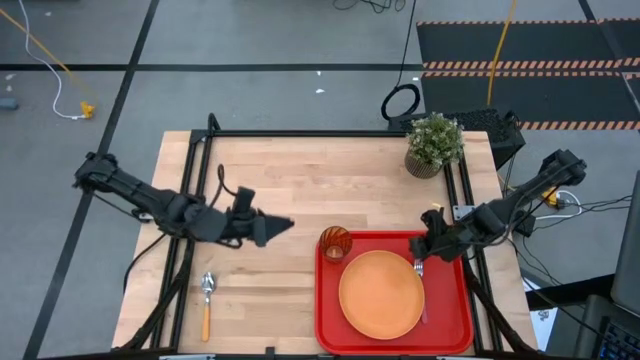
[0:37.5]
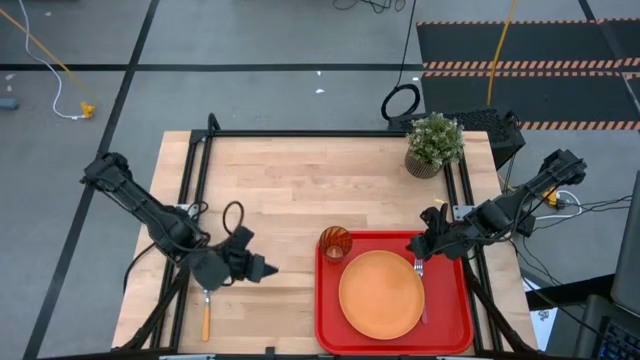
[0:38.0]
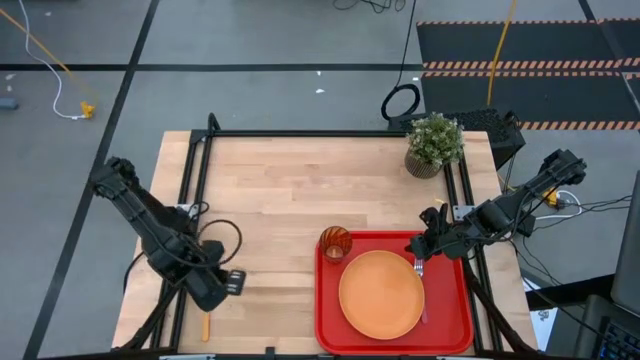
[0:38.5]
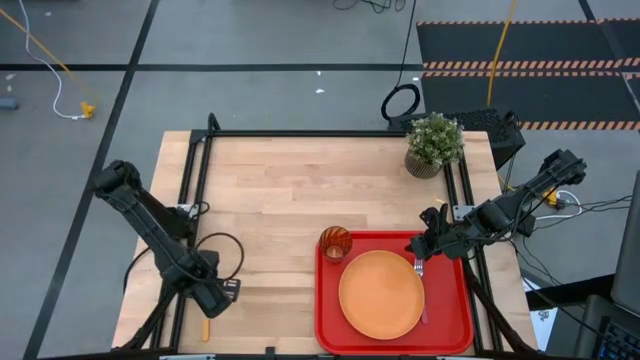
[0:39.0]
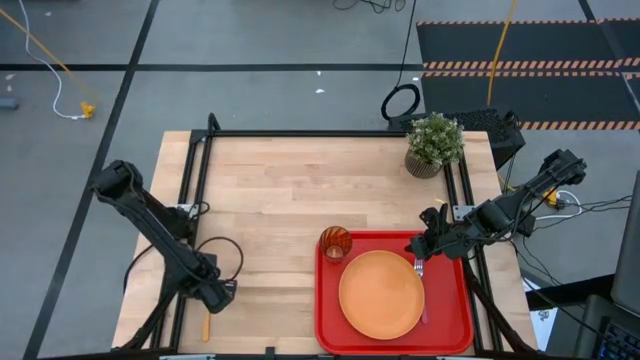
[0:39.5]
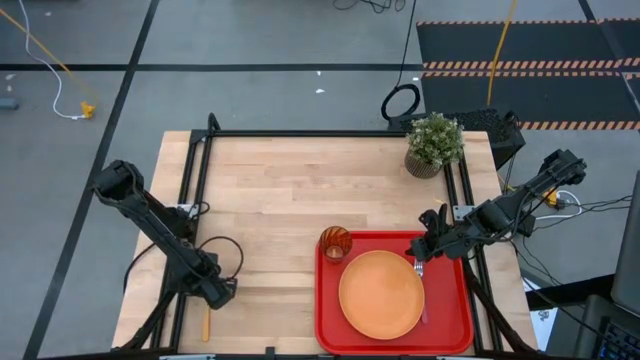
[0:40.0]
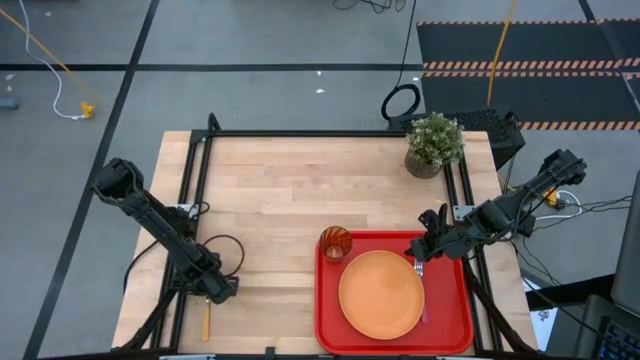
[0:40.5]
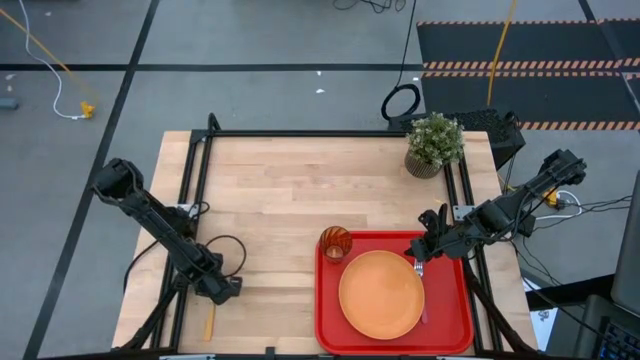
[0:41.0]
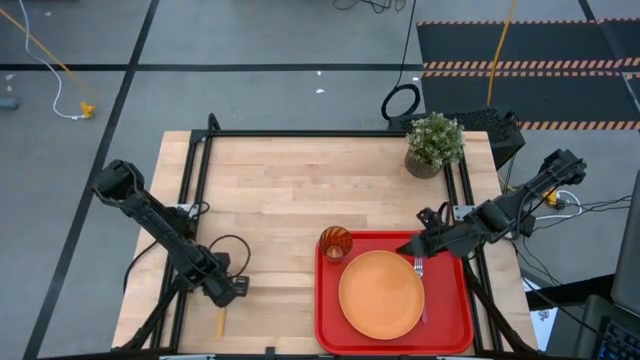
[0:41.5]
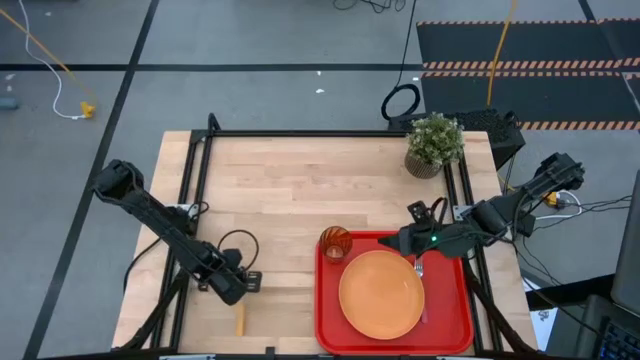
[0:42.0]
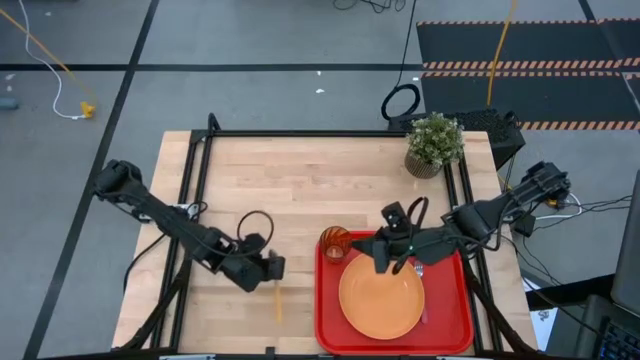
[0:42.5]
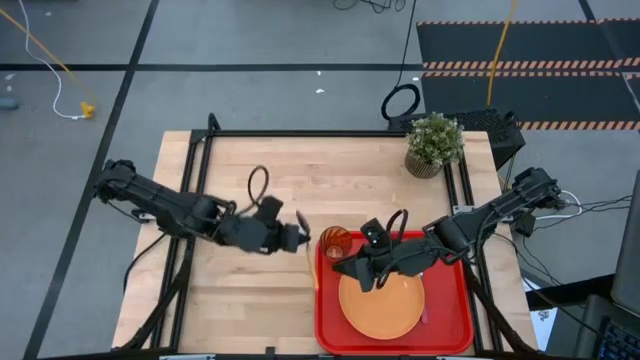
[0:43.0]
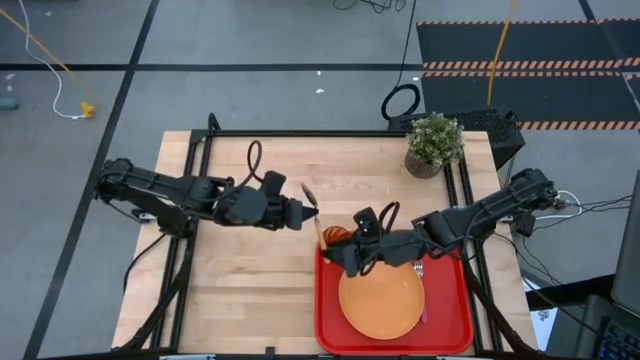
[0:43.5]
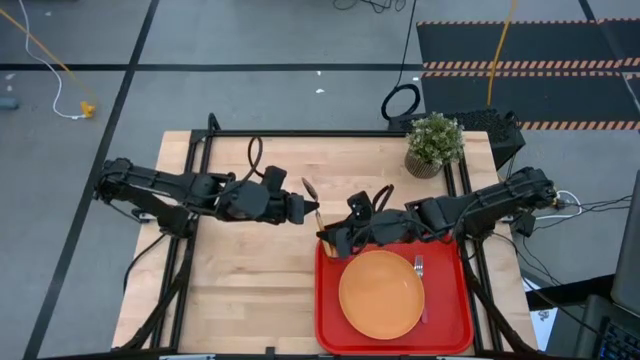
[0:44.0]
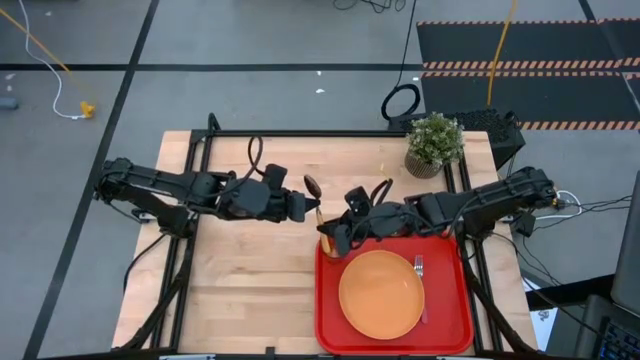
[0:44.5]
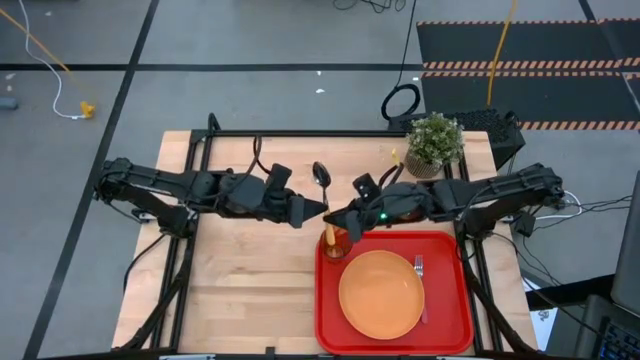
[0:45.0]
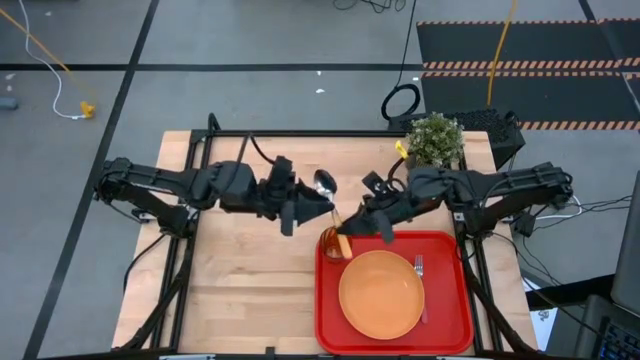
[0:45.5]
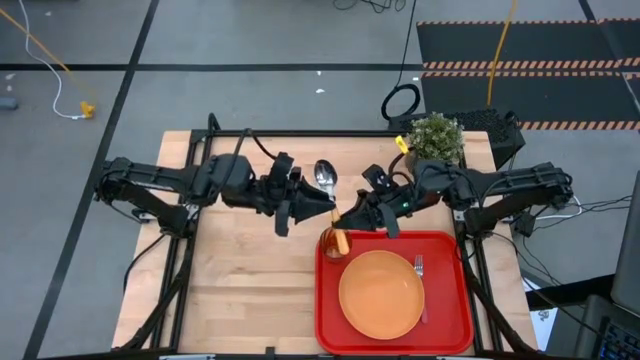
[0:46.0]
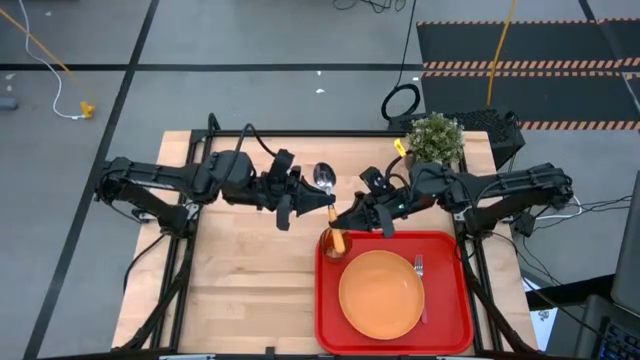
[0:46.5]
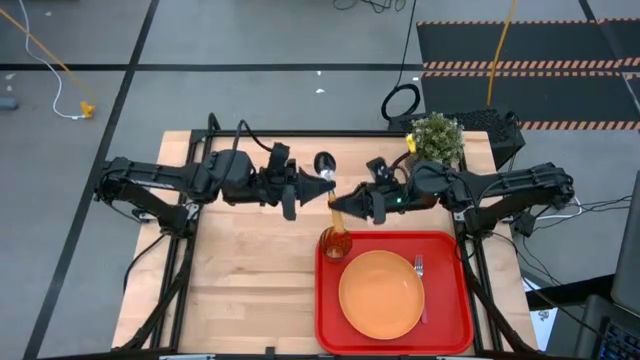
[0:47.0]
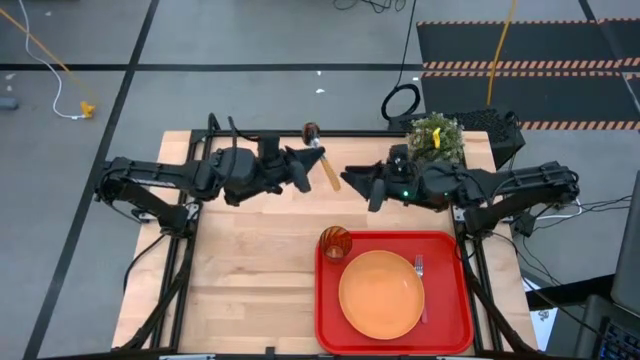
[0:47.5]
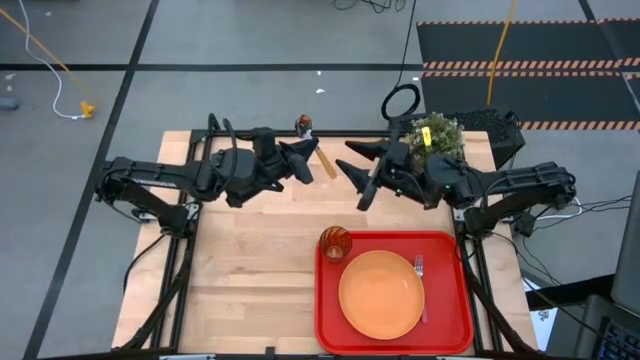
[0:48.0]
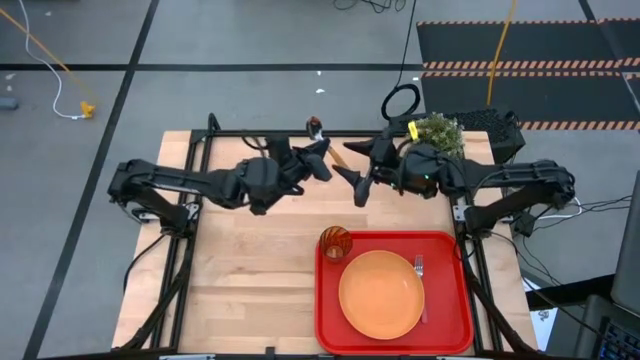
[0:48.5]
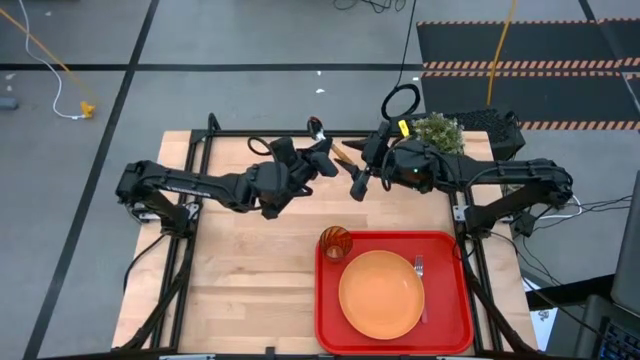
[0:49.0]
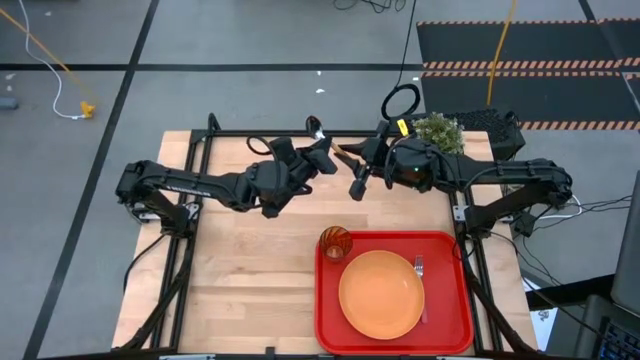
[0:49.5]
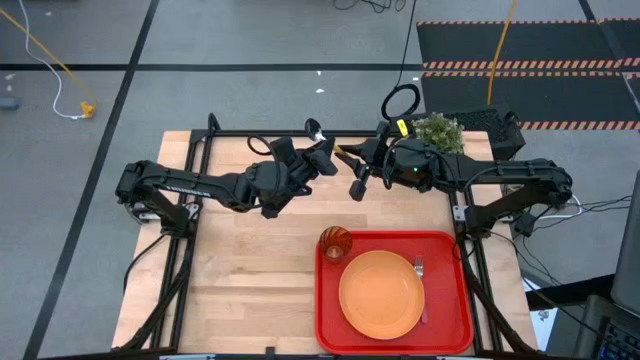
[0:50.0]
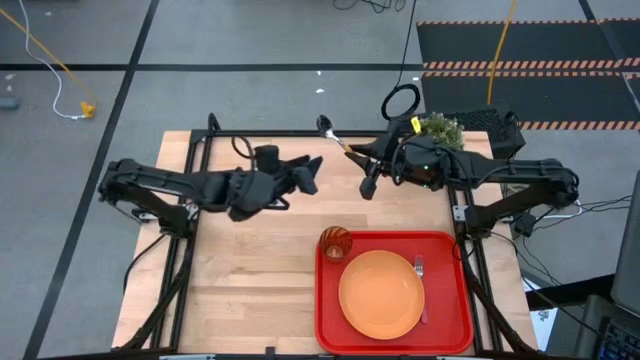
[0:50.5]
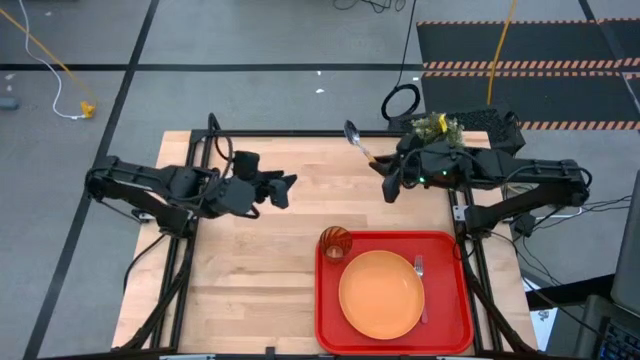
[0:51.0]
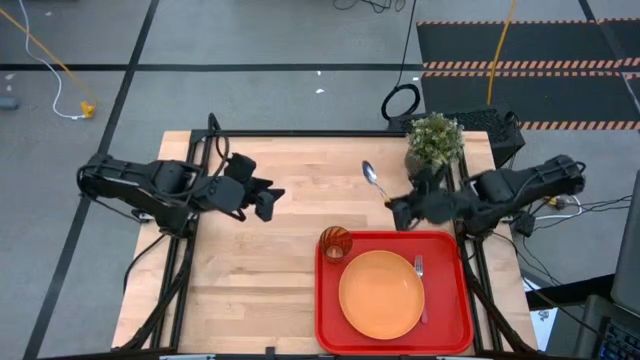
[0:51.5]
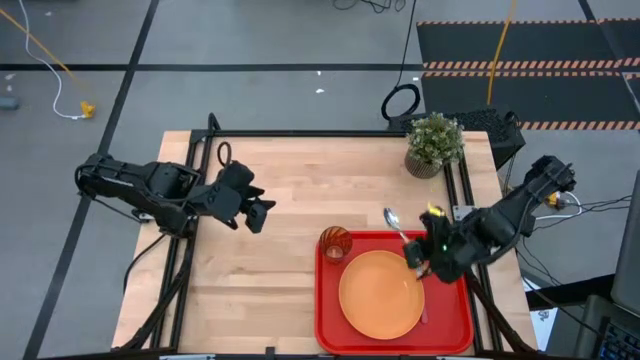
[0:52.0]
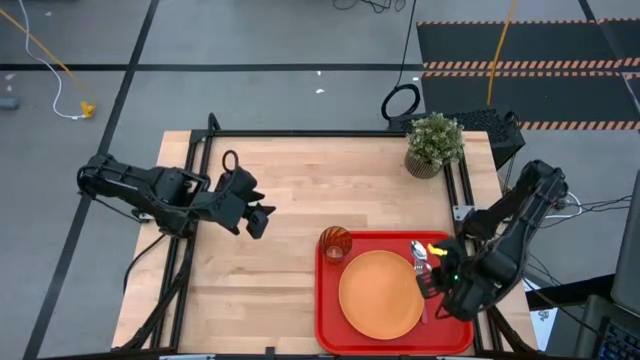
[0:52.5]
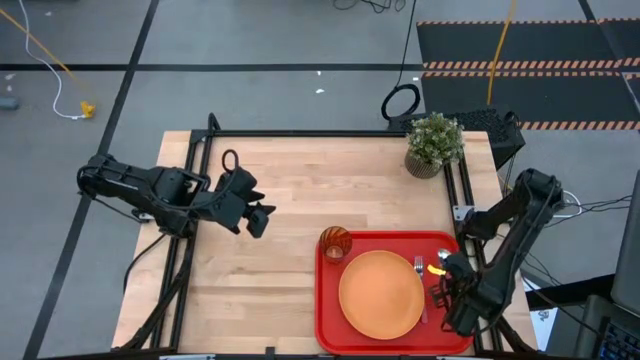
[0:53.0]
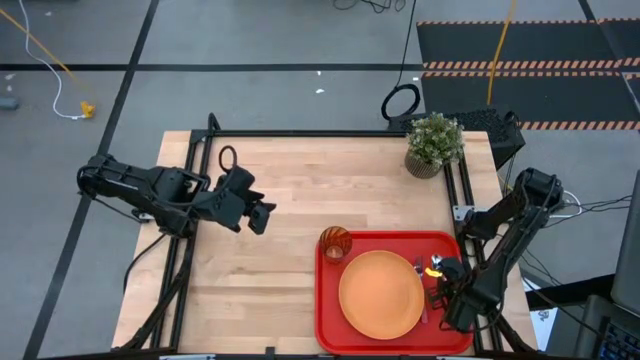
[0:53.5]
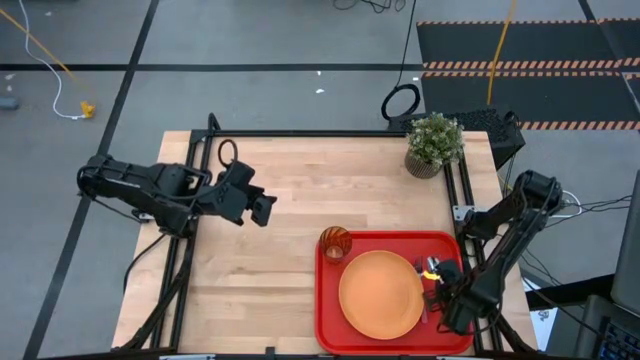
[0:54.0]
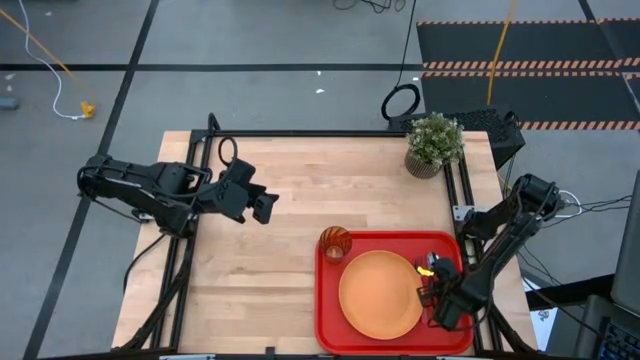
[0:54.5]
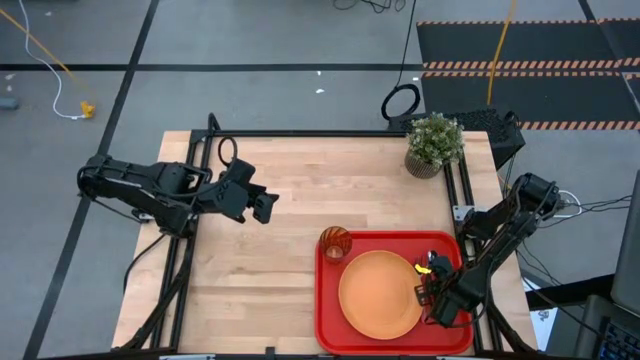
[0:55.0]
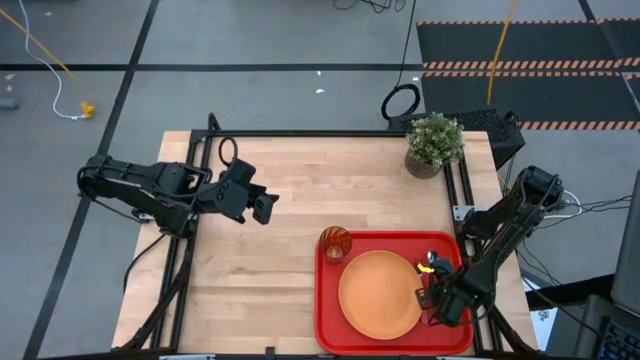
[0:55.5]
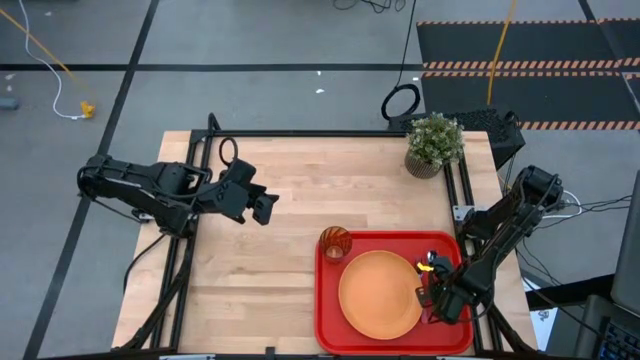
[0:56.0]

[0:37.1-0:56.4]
Task: Pick and place plate/cup/fork/spoon on tray
Put the yellow spoon on the red tray to the right of the red fork

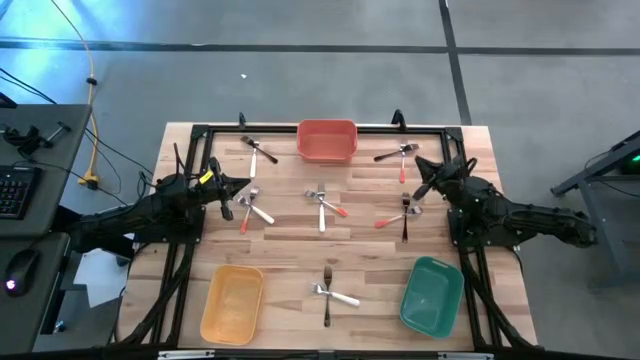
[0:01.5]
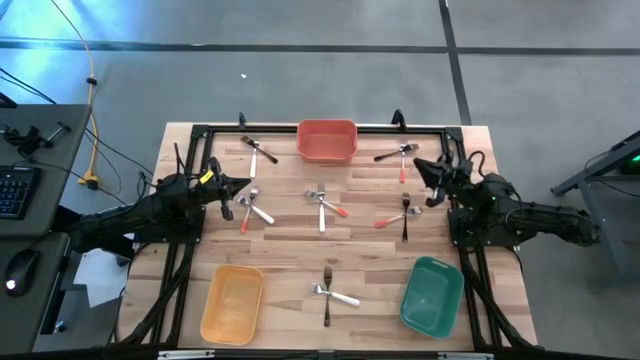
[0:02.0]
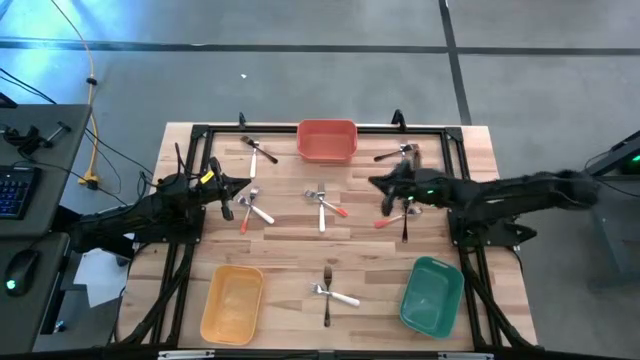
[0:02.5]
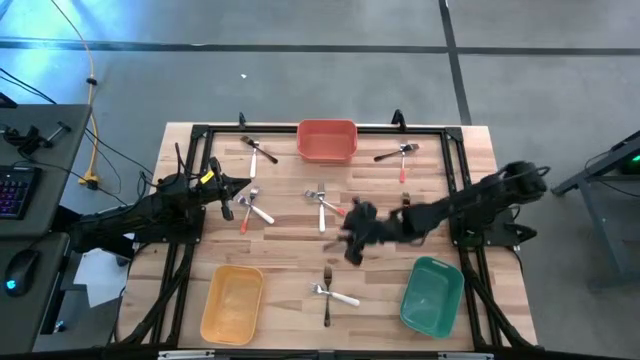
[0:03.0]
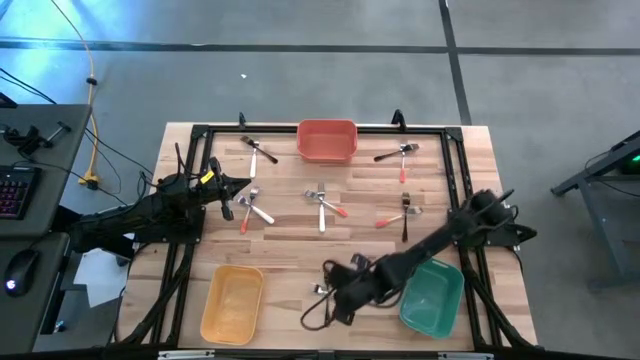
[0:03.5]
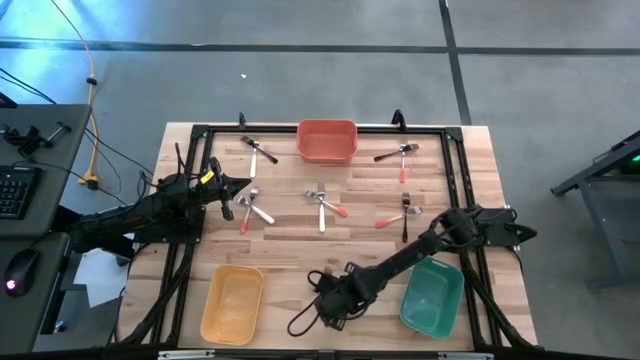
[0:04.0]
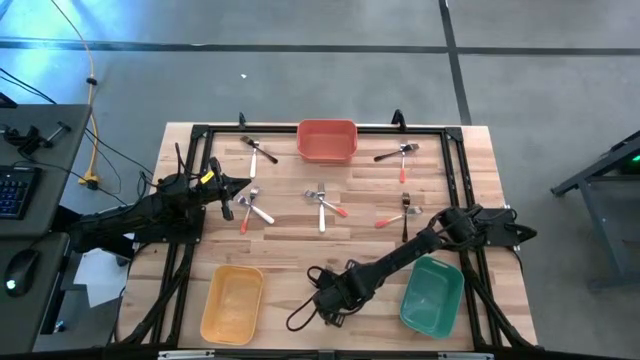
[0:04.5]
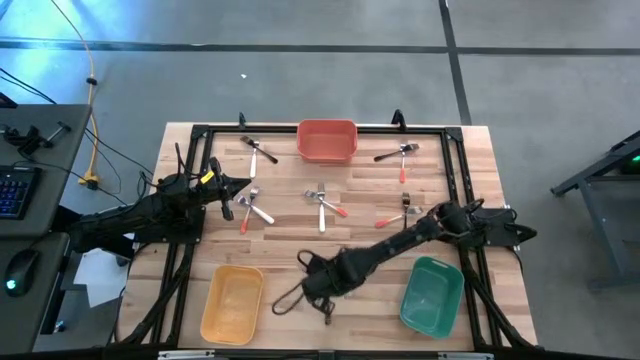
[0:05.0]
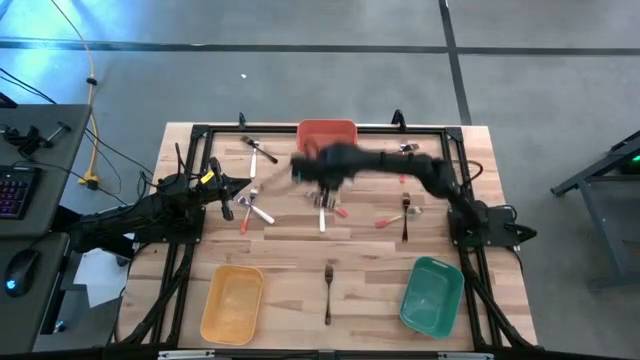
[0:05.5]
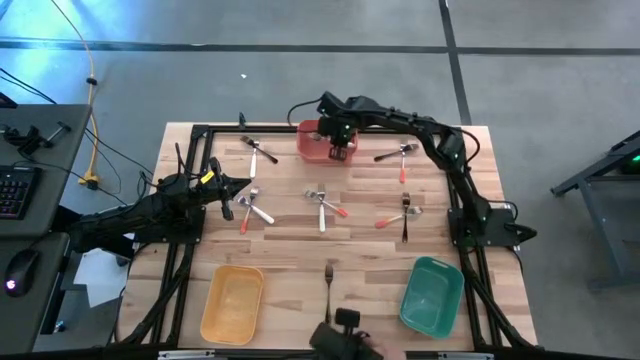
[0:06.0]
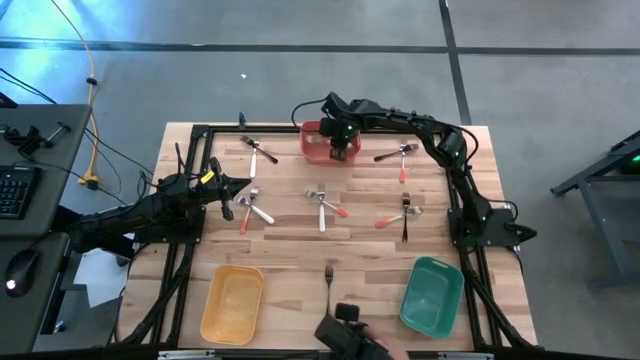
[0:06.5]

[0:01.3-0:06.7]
Task: Sort silverware by color (type)
Put the bottom white fork into the orange bin
